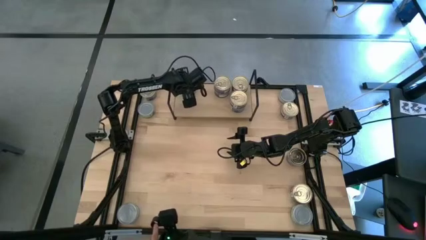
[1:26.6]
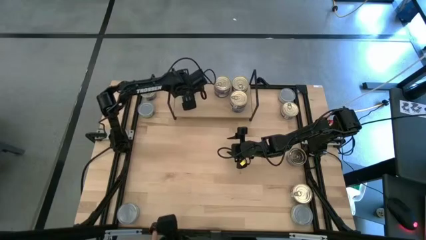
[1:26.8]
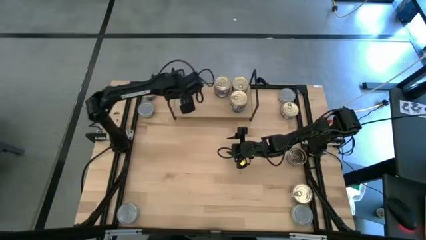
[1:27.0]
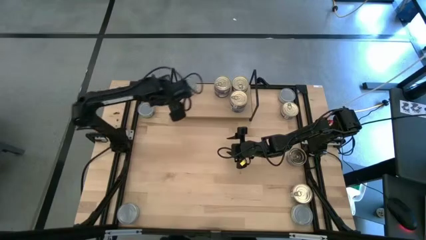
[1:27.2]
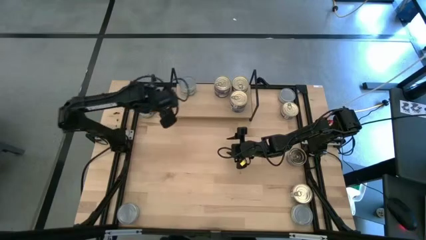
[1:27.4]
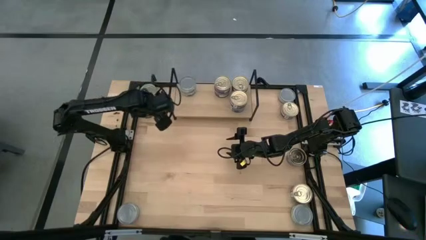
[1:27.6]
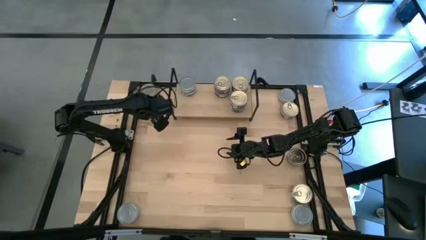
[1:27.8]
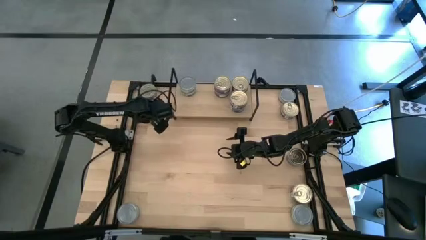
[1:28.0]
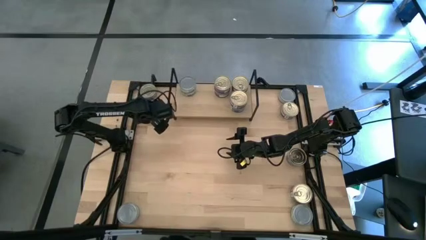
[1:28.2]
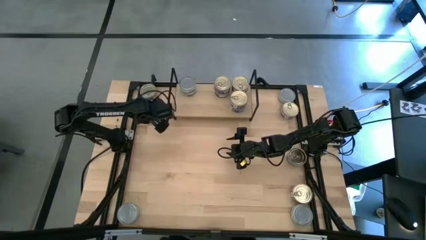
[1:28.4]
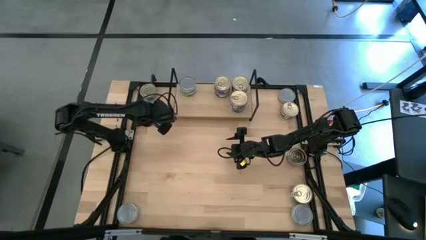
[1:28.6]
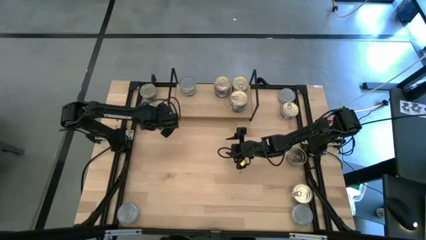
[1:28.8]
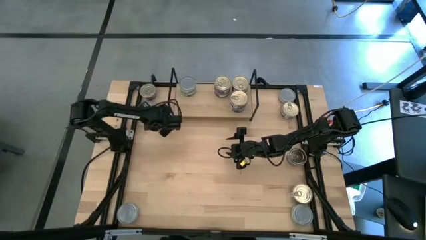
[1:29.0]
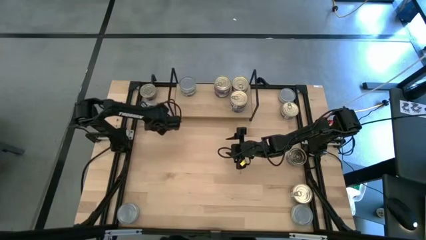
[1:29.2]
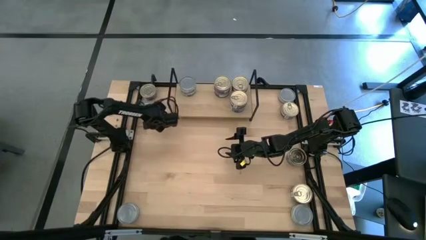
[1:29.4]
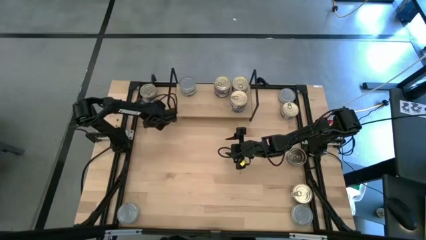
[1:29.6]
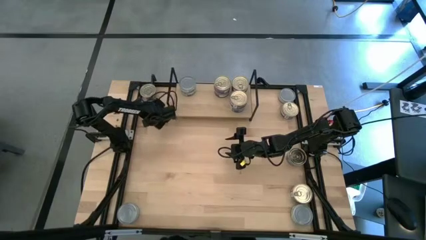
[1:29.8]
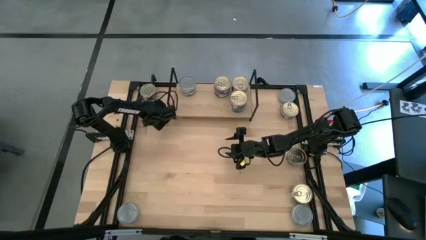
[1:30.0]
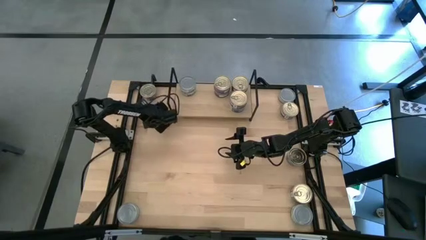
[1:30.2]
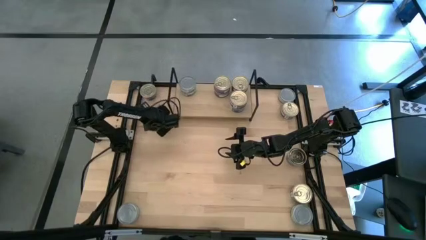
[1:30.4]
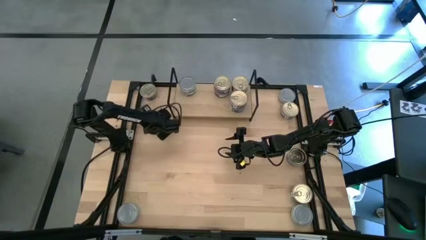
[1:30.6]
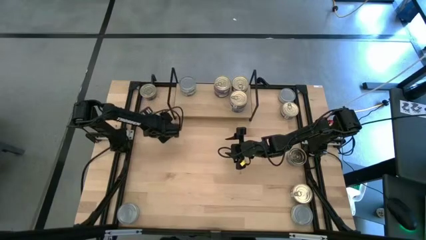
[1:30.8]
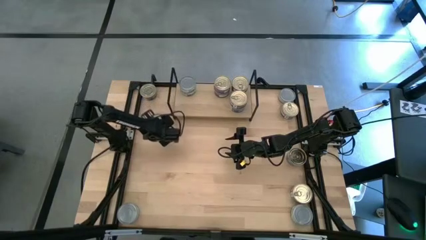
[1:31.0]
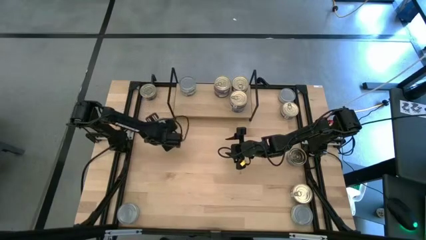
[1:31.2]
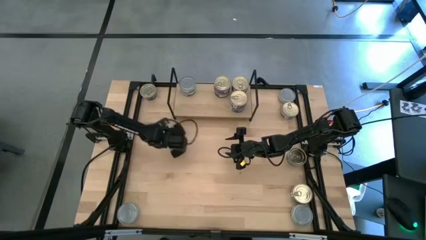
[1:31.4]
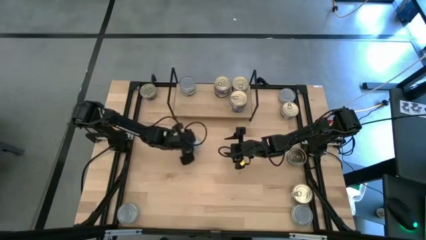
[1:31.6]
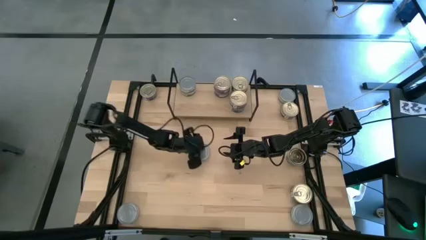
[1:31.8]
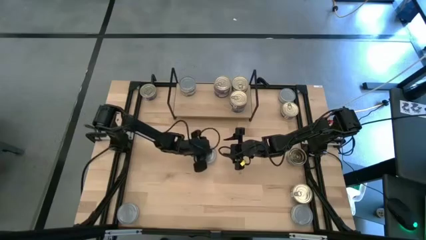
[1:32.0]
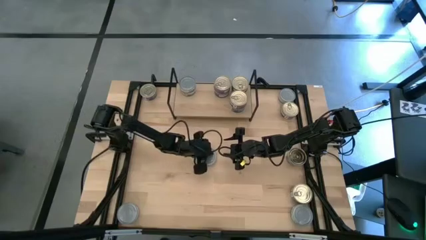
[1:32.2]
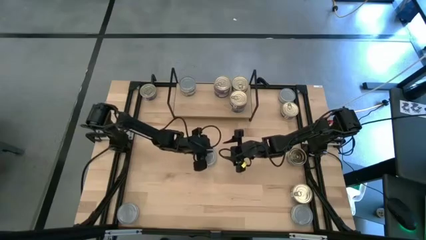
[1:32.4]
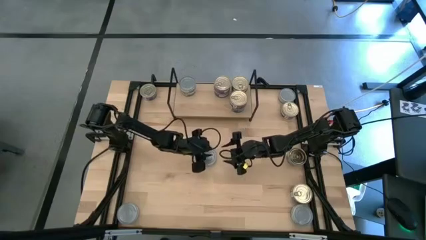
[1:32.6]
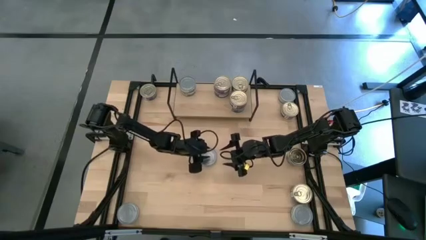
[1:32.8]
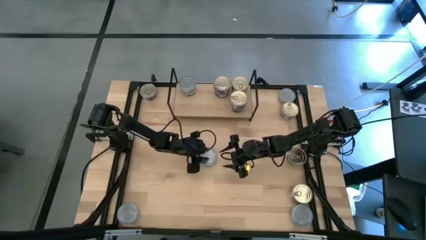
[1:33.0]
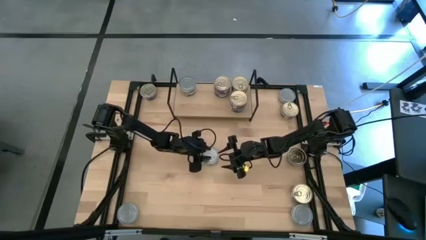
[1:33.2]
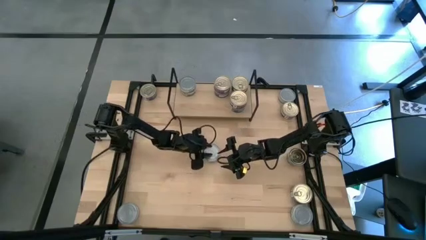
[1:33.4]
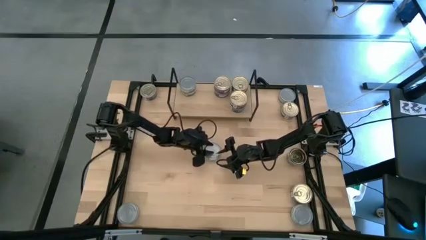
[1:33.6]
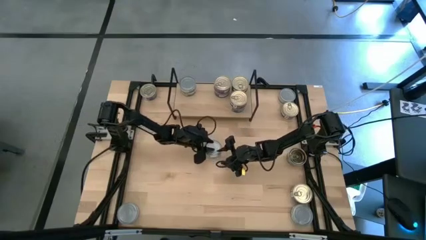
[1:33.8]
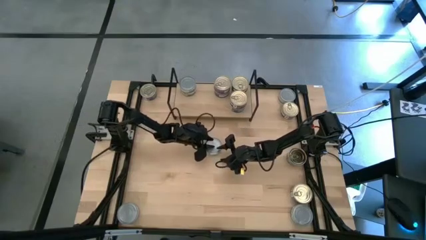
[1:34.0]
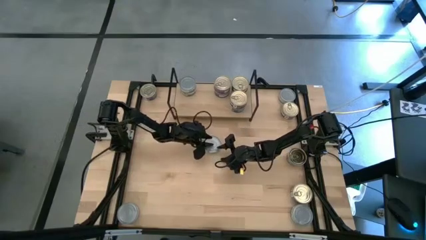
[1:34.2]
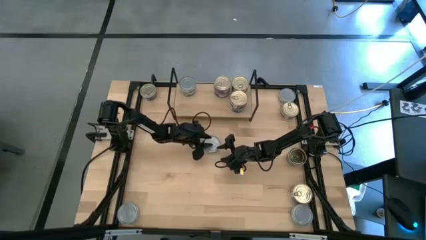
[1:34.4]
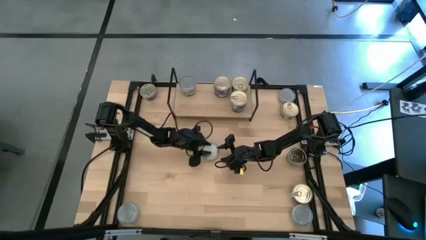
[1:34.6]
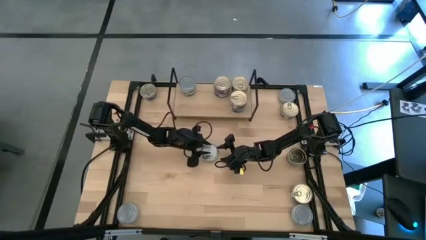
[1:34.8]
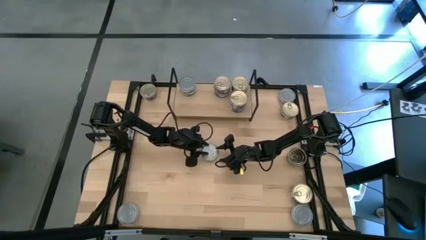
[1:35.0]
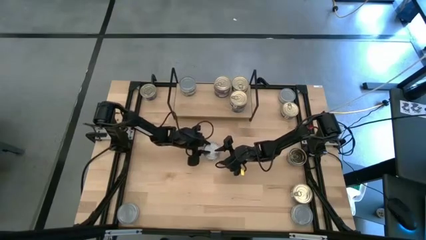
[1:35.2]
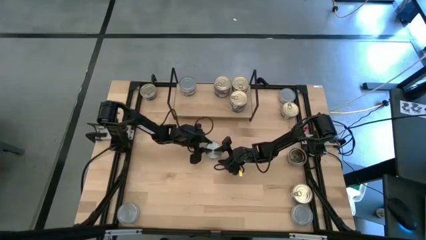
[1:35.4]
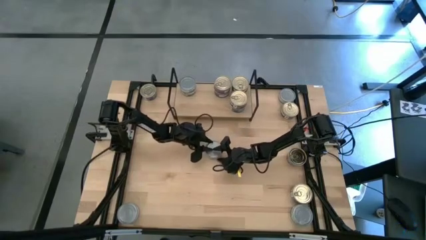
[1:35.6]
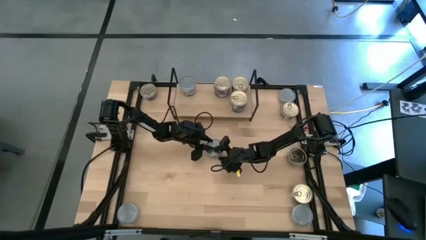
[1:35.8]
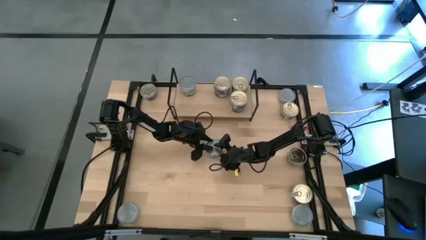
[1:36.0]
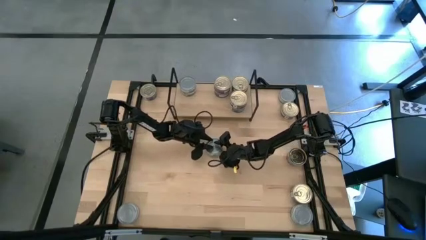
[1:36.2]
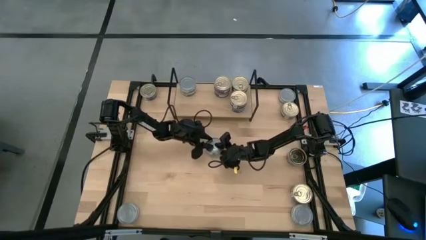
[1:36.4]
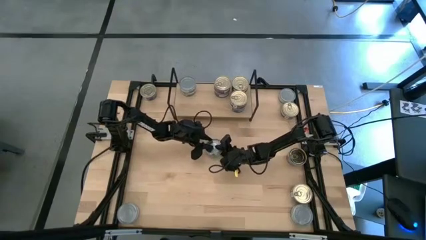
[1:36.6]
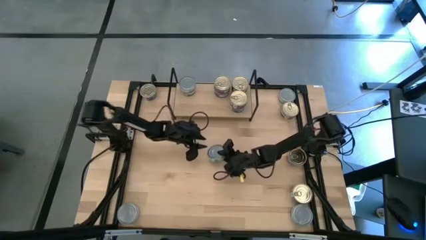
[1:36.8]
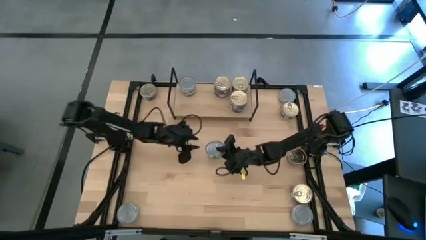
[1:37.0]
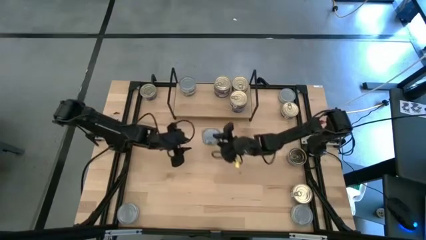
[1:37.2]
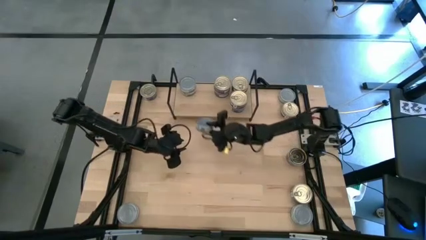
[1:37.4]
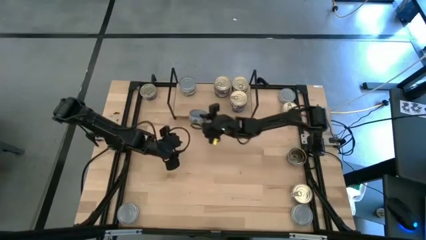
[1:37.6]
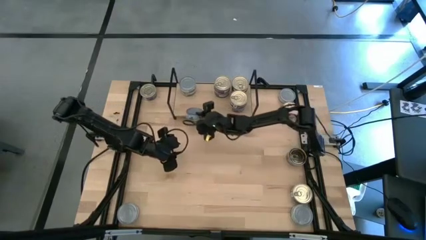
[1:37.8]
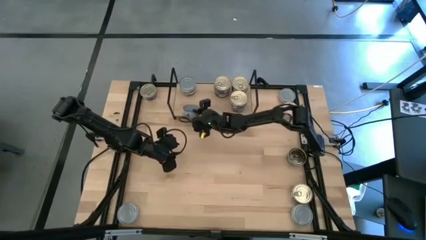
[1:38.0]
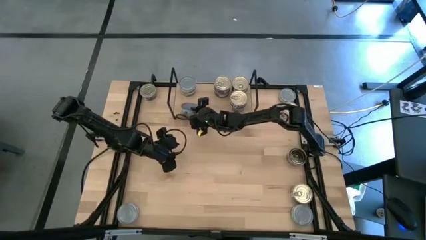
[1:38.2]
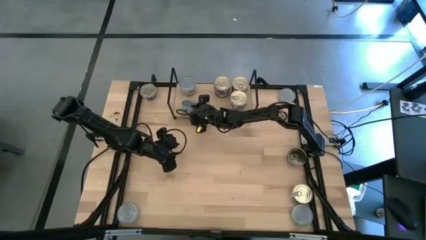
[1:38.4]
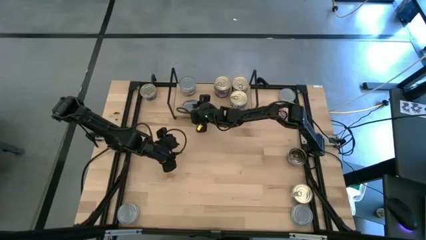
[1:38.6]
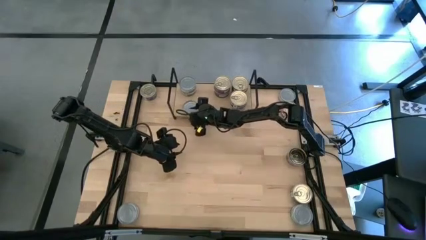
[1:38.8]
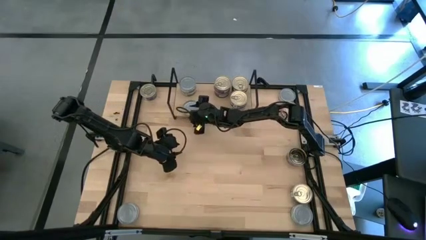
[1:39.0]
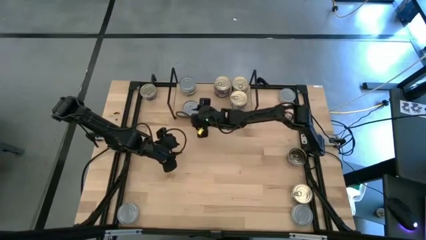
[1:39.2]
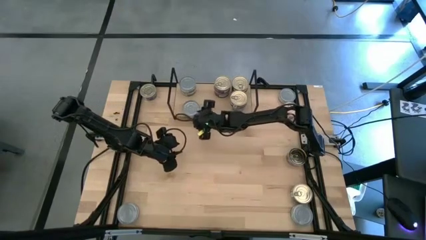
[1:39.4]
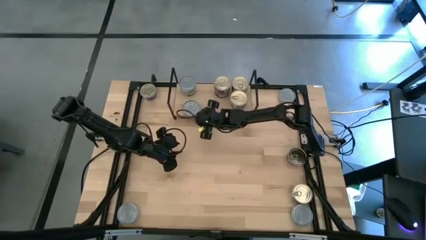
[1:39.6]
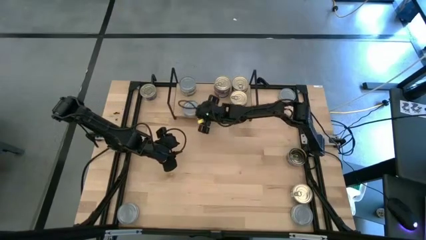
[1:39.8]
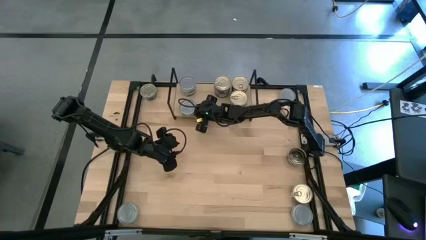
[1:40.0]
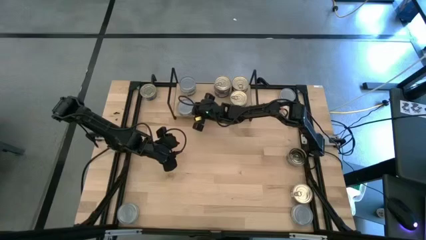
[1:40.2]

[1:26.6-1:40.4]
Task: Stack canned seafood by type on shelf
Put the green and white tuna can on the shelf aligned with the other green and white tuna cans

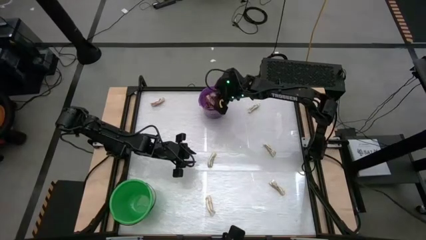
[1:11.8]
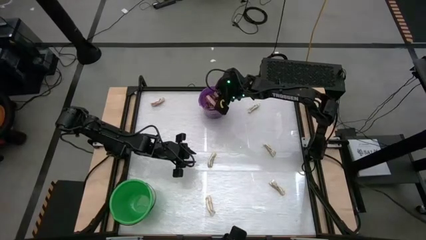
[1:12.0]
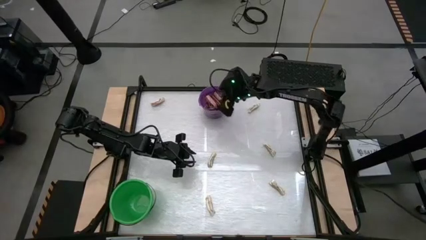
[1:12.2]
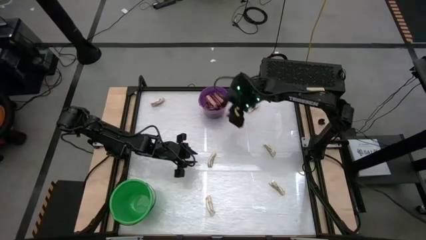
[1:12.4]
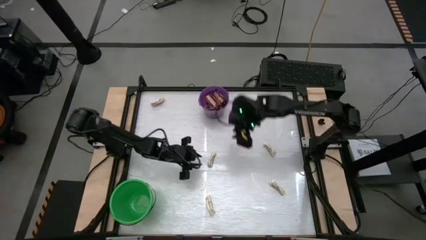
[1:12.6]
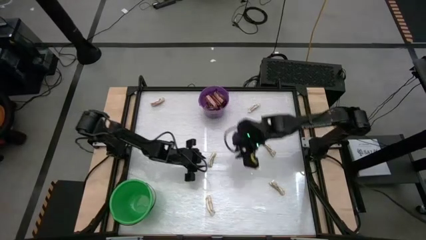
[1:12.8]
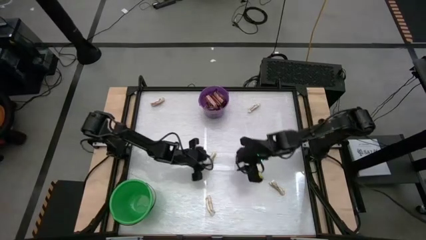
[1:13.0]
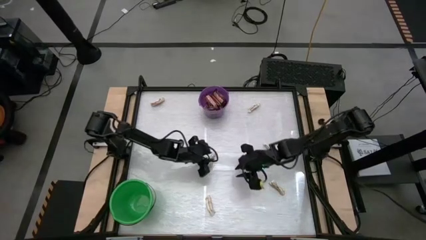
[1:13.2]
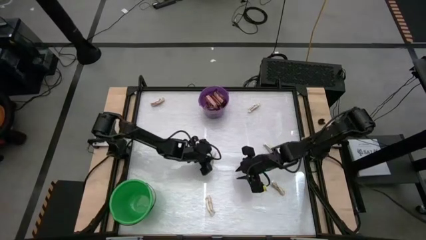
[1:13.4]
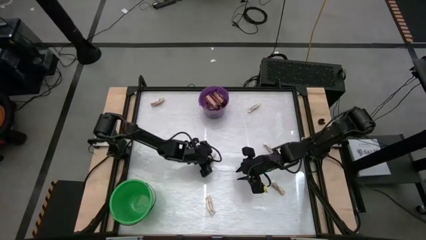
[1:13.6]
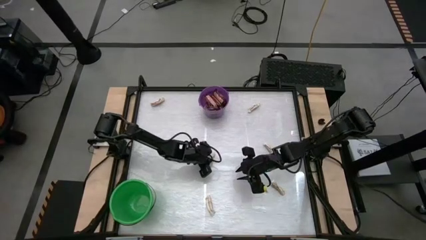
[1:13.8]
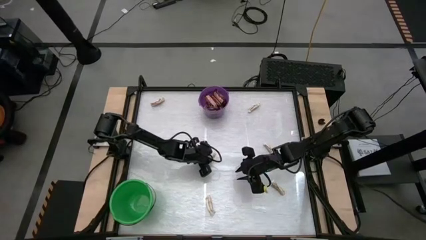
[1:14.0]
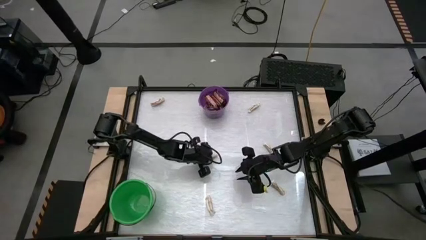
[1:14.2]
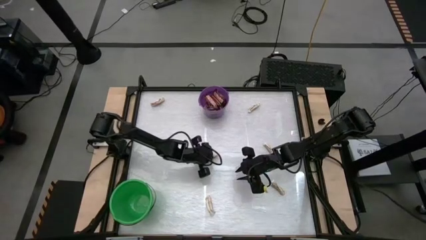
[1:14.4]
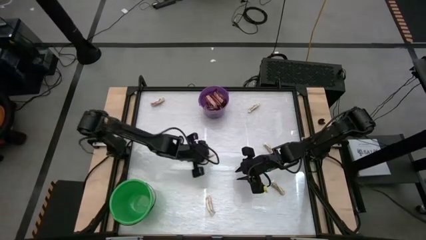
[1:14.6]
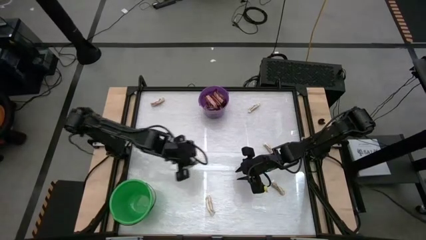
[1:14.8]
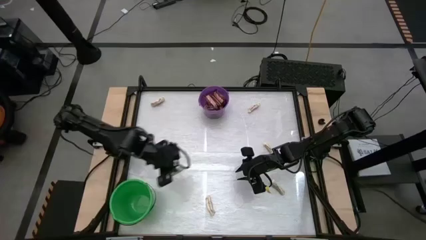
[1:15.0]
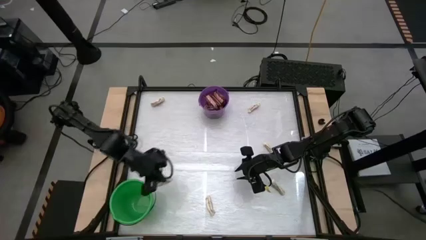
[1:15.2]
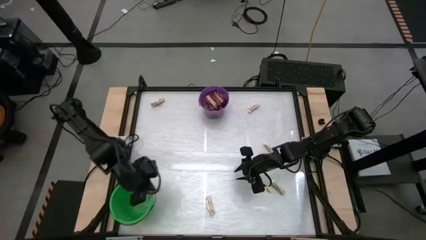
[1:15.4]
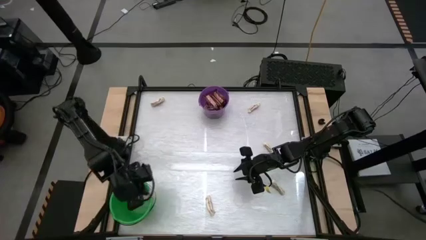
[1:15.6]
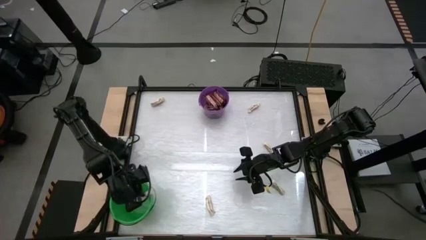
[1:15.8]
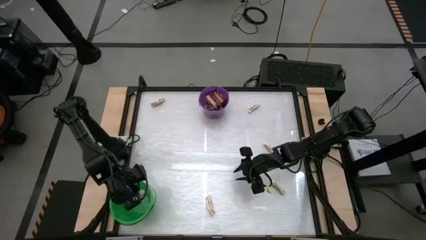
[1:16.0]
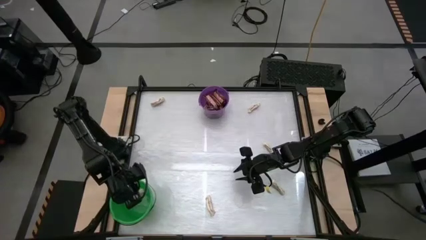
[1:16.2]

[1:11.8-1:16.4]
Task: Sort candy by brand, put in halloween buckets
Put the white chocolate into the green bucket
